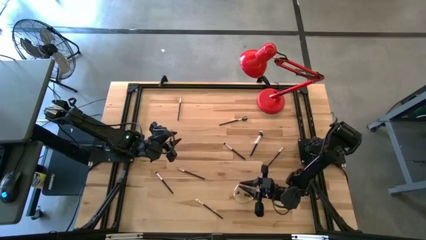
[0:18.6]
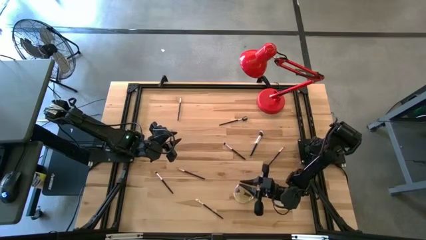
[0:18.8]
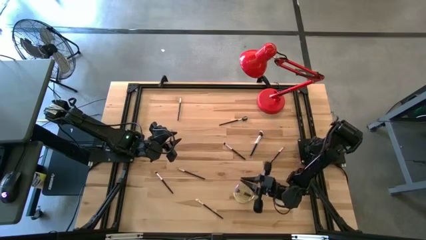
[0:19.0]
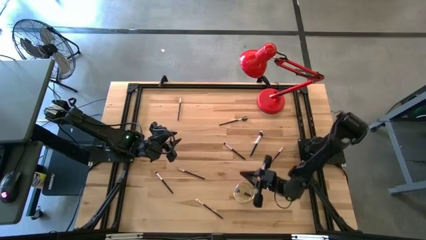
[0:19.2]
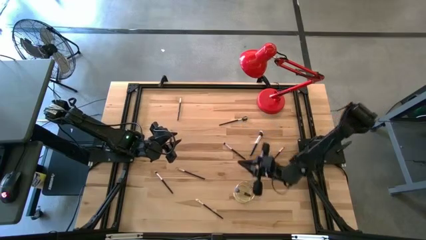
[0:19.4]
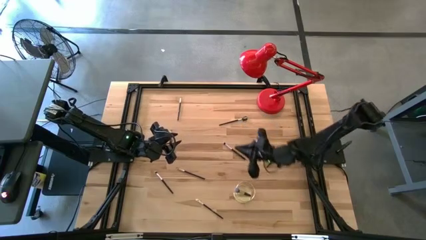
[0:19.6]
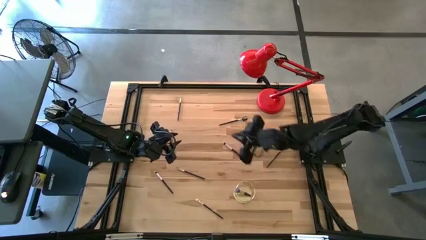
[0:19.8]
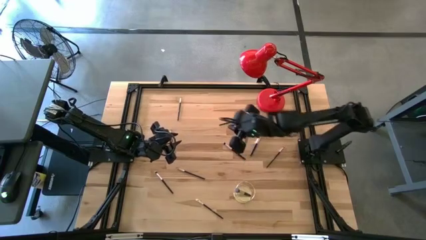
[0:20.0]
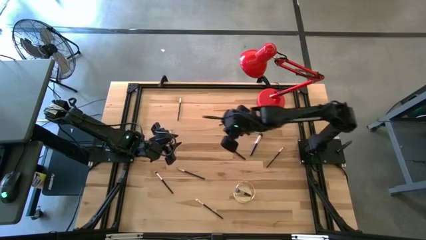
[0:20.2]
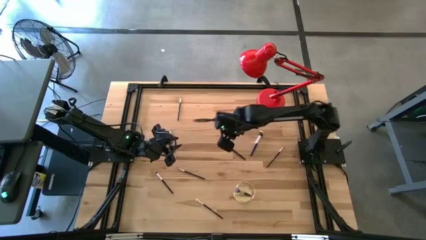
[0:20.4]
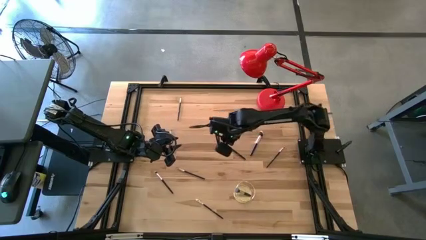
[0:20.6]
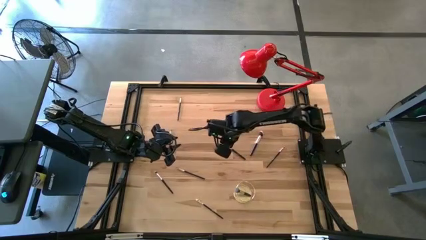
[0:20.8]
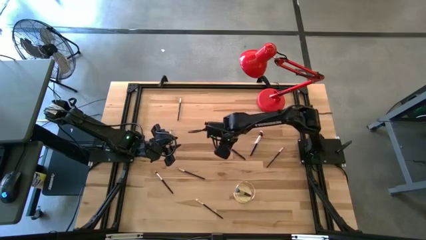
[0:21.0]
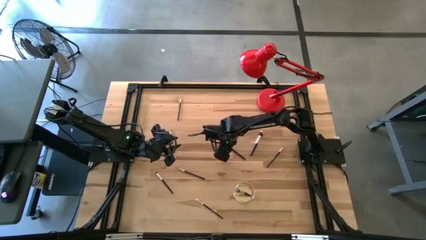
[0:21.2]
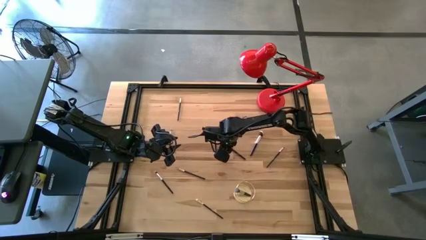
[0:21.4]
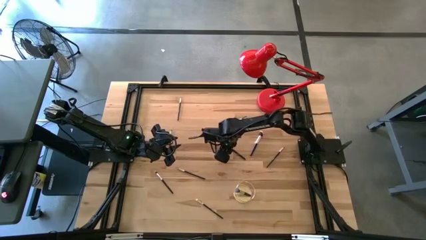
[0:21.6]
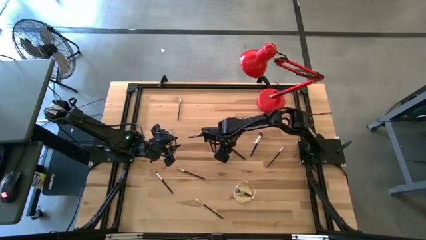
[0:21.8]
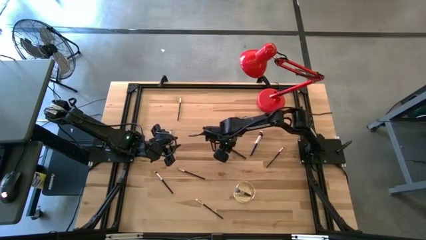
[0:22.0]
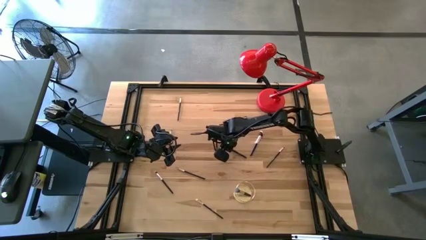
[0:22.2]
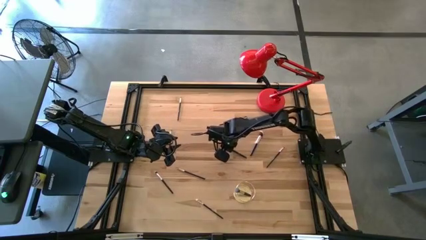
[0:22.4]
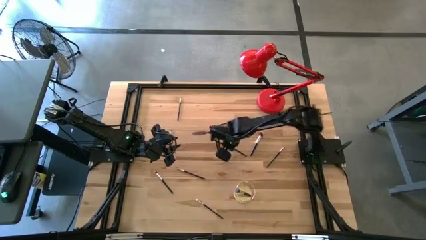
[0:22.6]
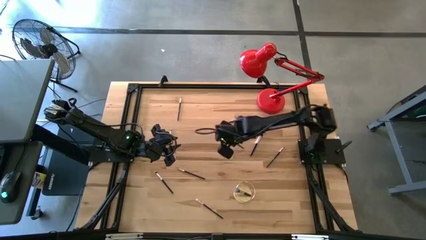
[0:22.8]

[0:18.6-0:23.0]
Task: Pick & Place Makeup Brushes
Put the eyeshadow brush into the gold makeup holder

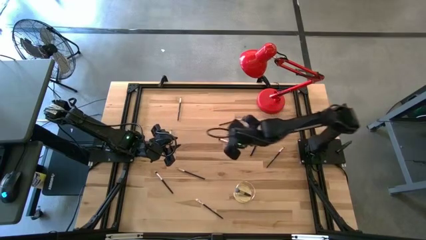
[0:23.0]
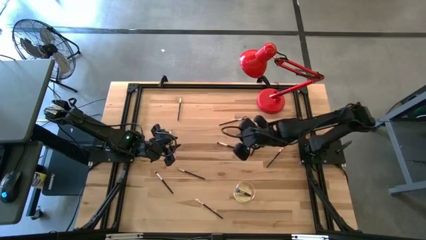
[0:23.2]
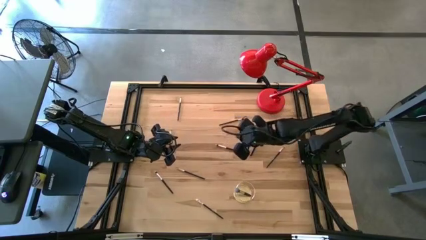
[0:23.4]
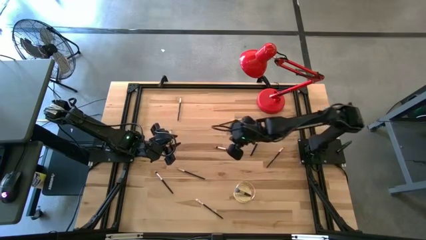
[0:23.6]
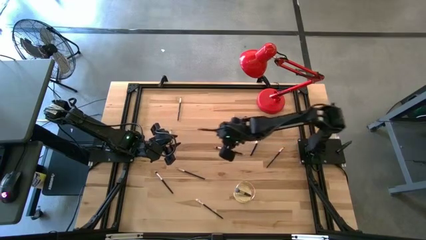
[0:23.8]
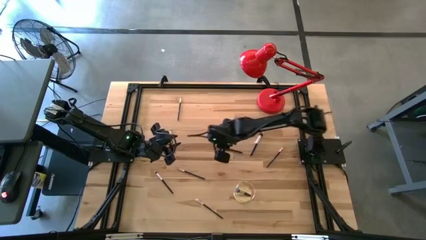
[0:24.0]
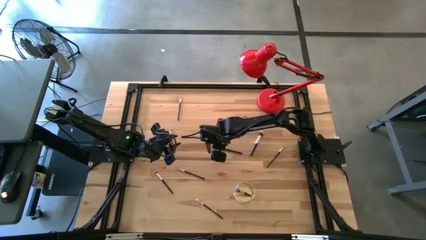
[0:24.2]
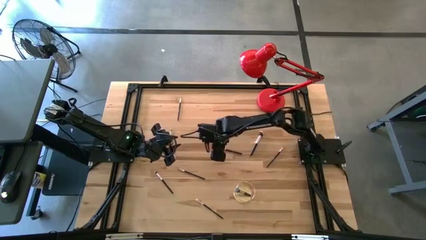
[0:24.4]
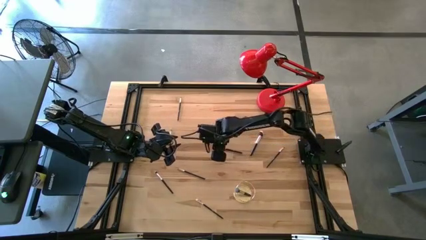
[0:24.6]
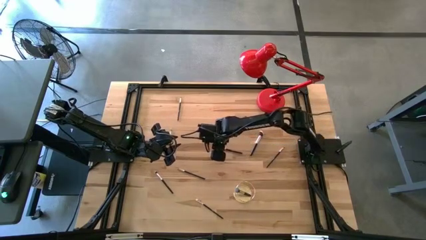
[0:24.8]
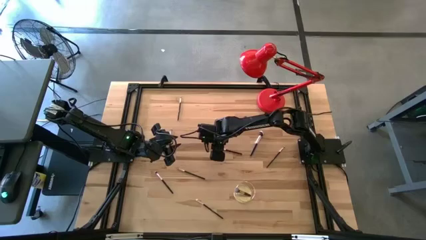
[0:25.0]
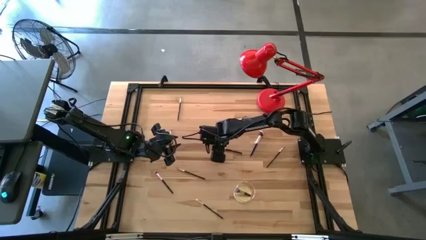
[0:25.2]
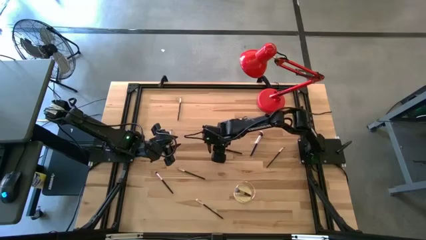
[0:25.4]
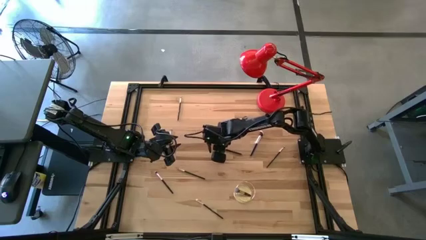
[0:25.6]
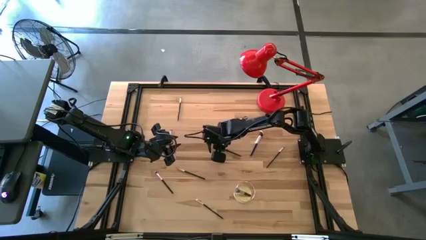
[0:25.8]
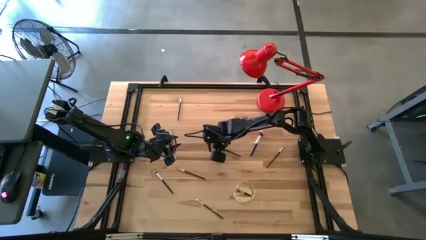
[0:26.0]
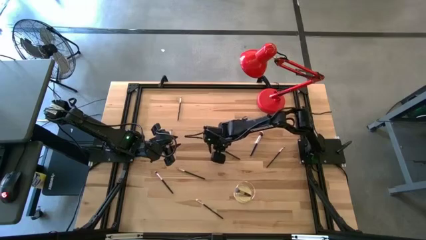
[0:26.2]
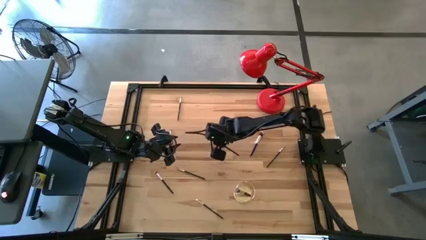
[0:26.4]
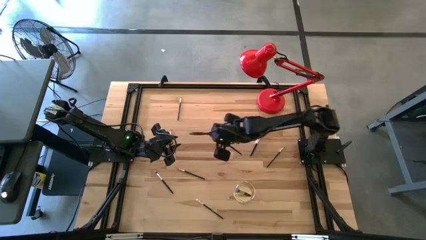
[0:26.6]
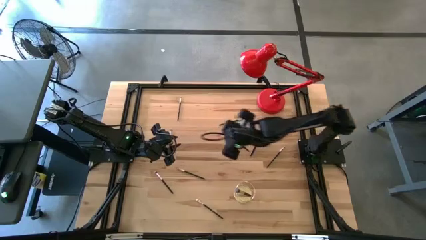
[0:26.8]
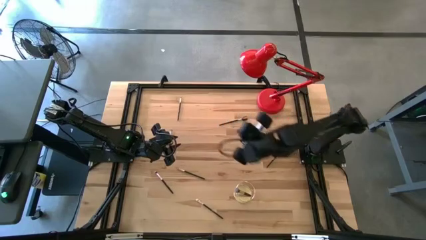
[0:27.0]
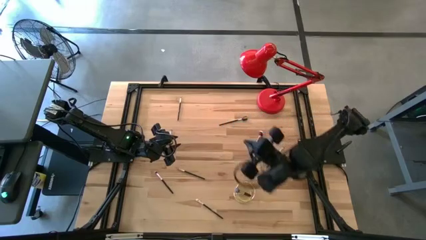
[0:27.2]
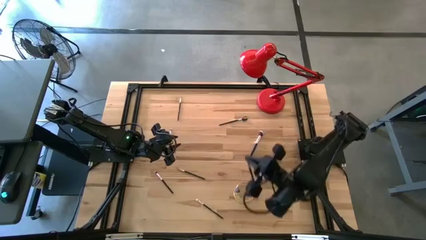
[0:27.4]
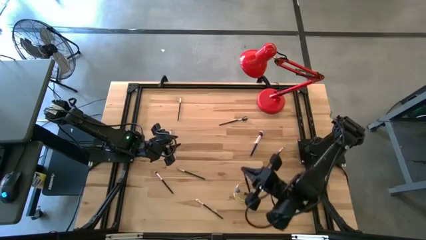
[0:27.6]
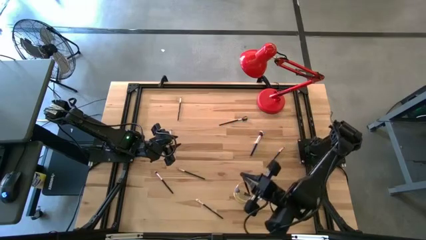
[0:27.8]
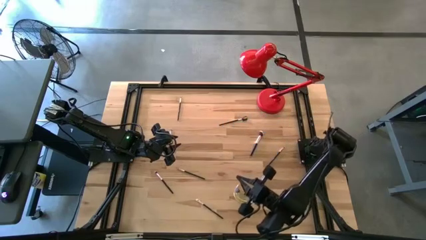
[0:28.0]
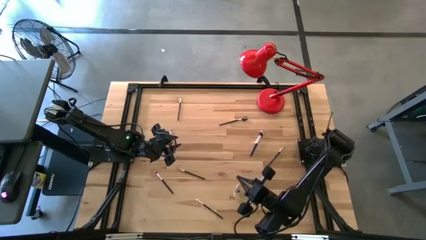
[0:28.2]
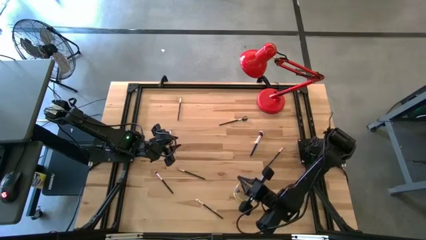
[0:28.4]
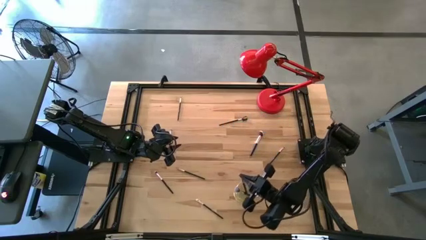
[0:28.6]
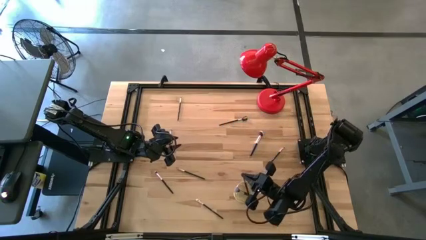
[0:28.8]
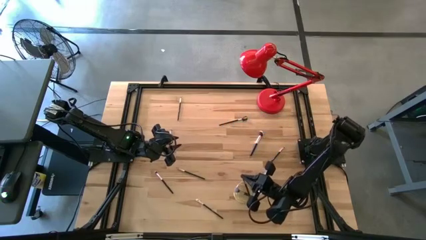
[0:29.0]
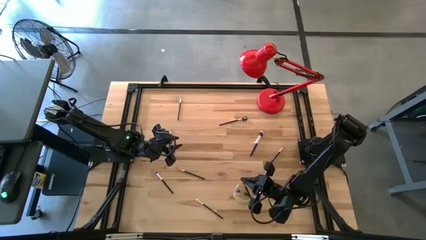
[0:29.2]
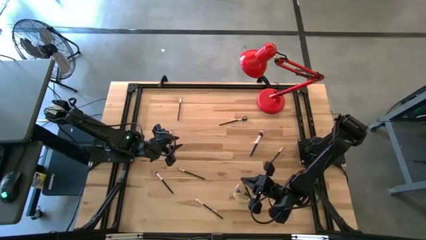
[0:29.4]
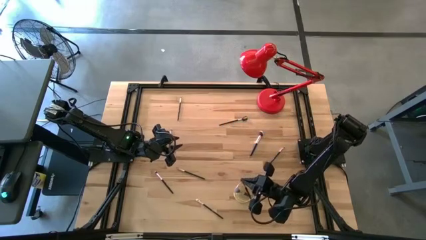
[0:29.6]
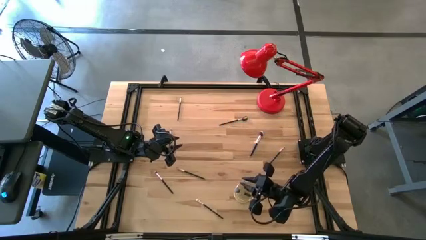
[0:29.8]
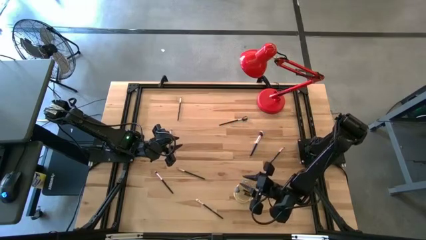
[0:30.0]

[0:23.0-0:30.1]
Put the eyeshadow brush into the gold makeup holder

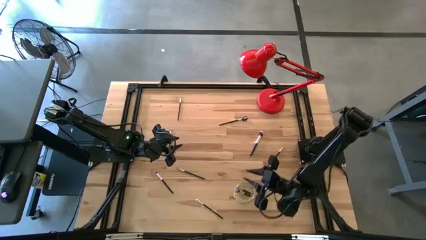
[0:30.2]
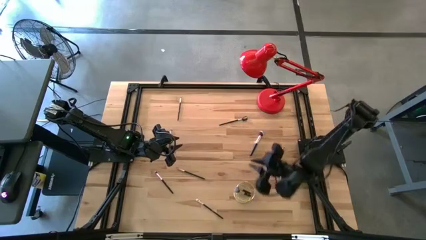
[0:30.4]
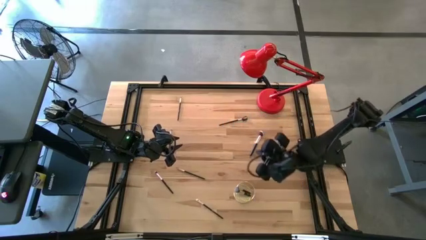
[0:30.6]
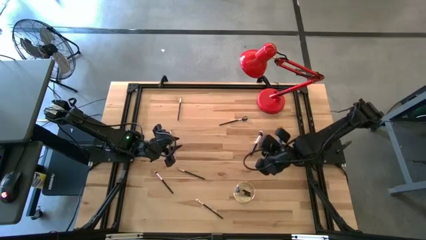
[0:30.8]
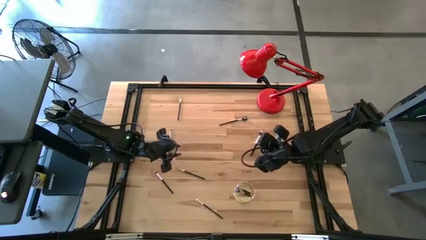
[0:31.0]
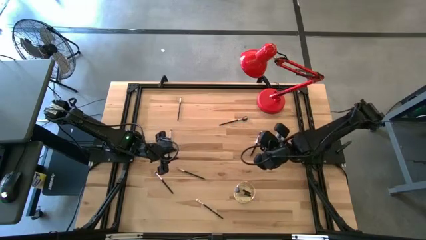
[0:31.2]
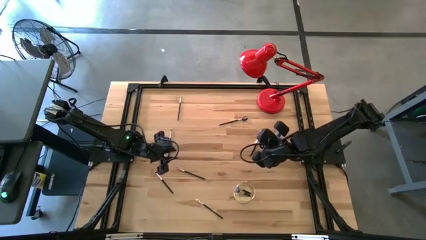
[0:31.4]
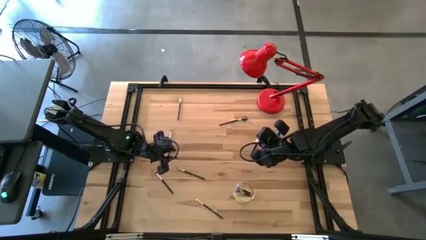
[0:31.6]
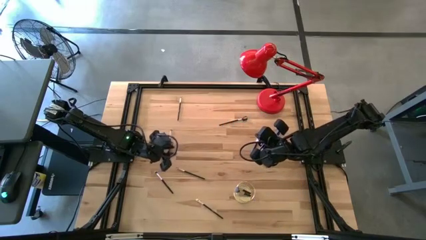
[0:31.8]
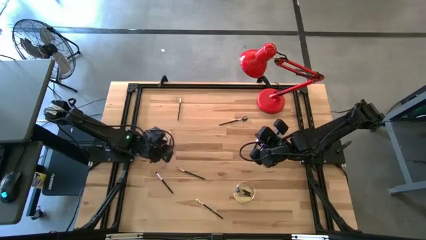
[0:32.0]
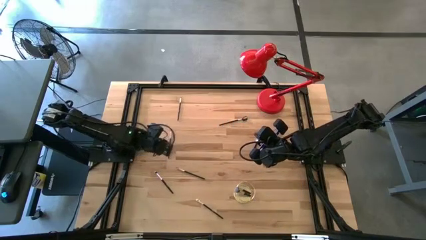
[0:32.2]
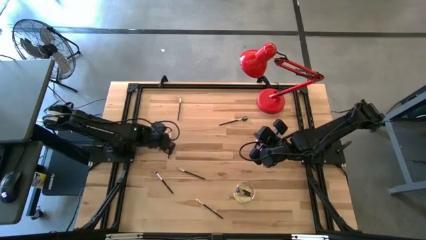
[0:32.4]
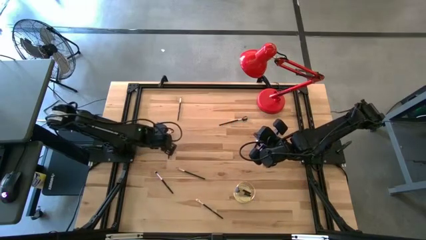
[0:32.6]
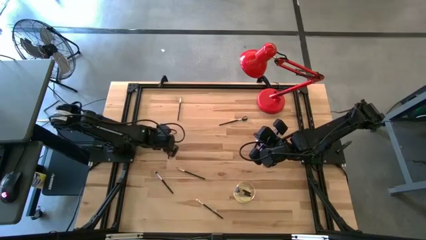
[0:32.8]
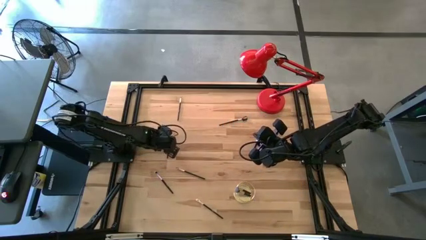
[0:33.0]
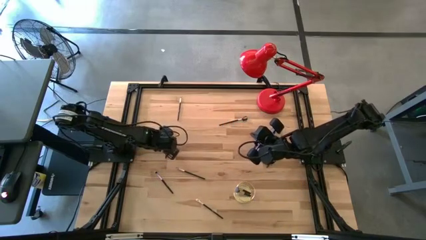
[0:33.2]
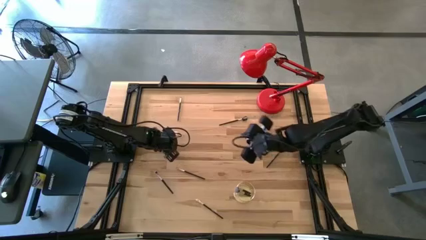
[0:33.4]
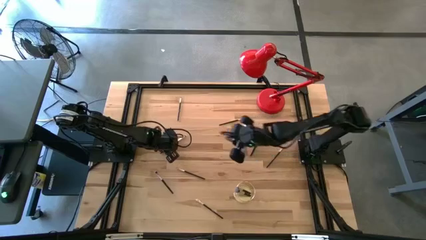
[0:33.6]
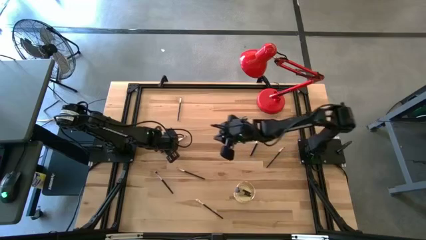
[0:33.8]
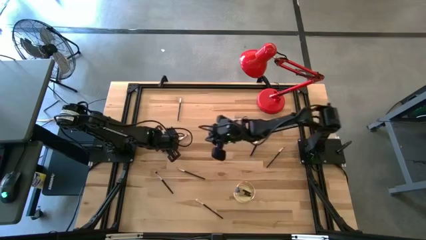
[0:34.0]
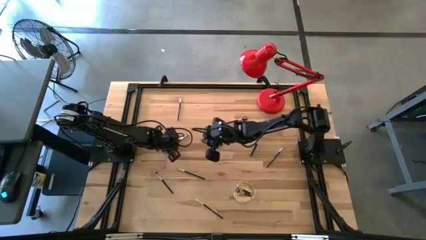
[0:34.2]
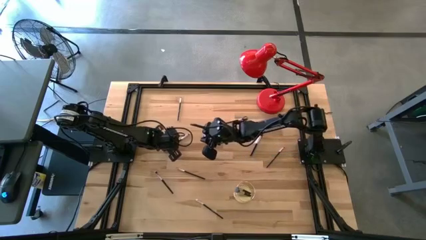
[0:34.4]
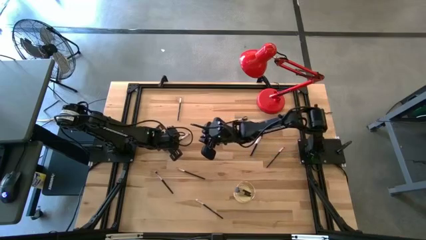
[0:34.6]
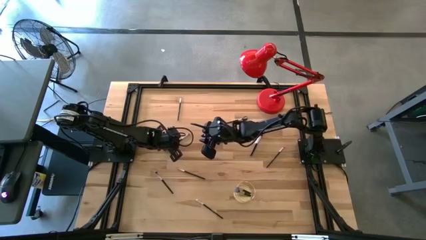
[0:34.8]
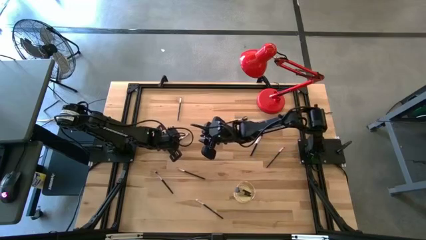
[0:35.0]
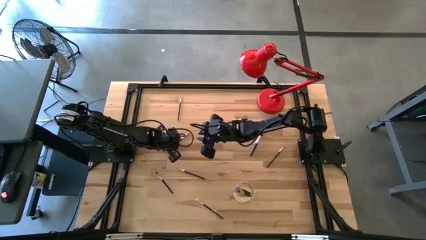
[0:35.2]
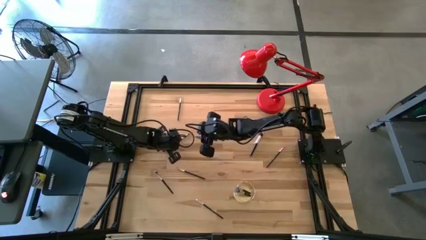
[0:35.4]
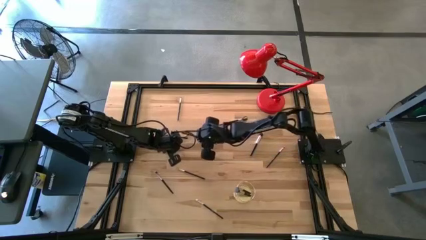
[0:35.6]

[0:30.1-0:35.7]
Put the eyeshadow brush into the gold makeup holder
